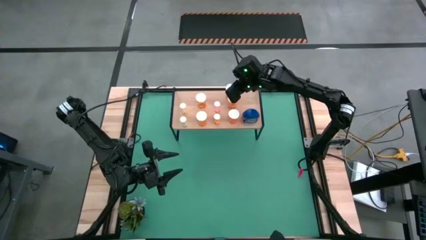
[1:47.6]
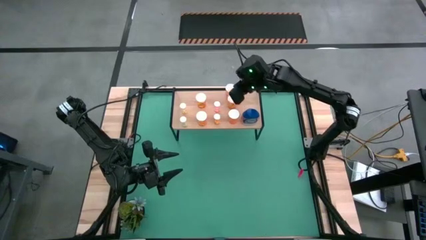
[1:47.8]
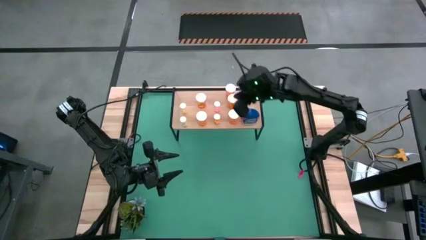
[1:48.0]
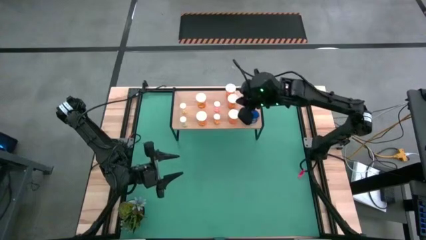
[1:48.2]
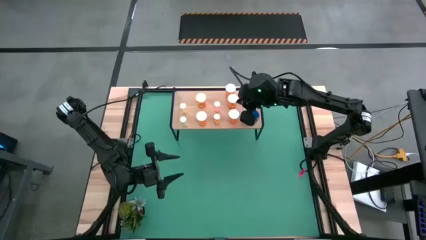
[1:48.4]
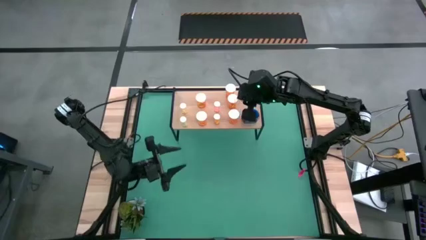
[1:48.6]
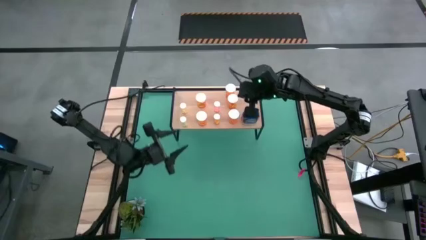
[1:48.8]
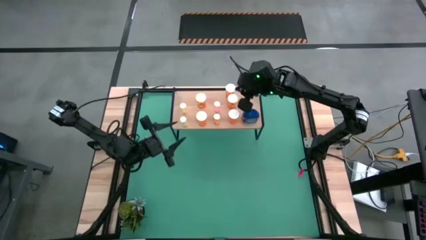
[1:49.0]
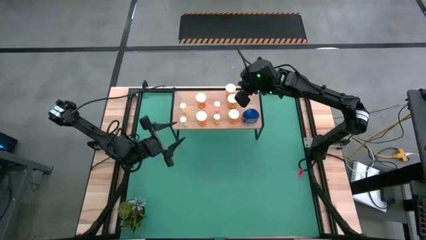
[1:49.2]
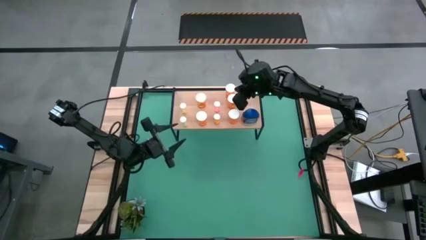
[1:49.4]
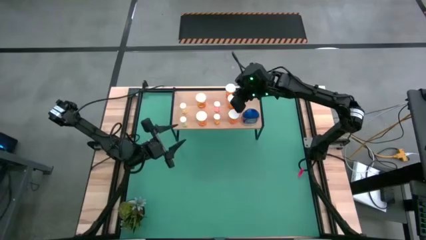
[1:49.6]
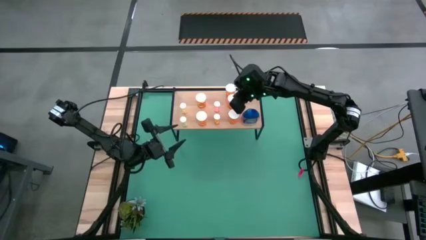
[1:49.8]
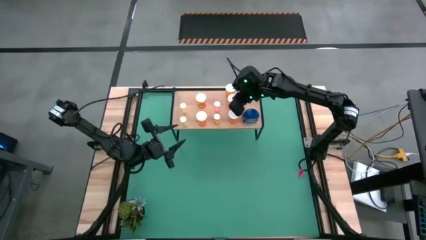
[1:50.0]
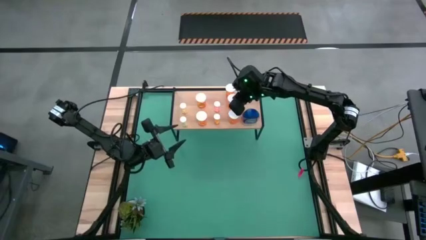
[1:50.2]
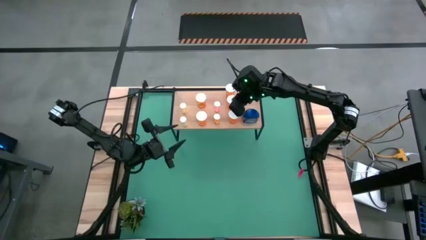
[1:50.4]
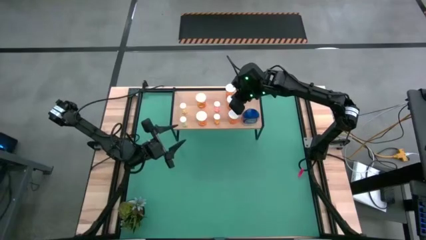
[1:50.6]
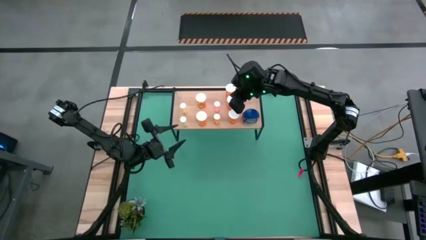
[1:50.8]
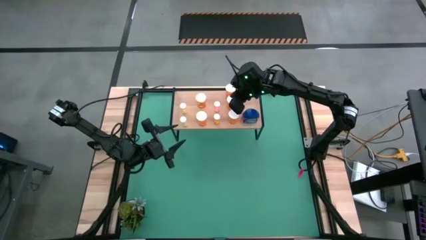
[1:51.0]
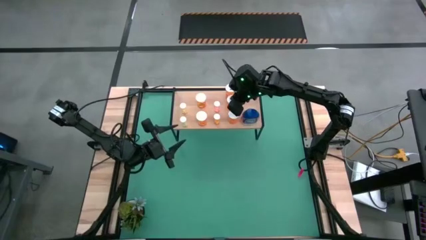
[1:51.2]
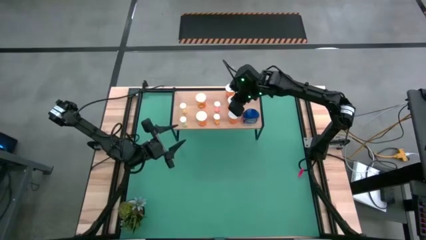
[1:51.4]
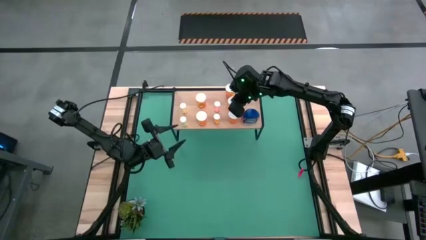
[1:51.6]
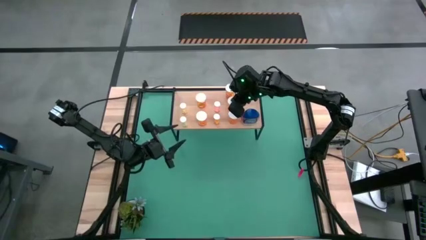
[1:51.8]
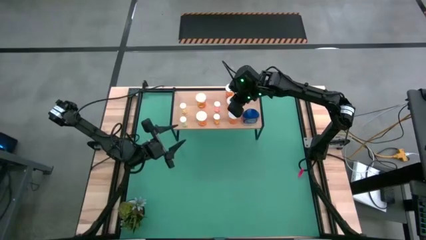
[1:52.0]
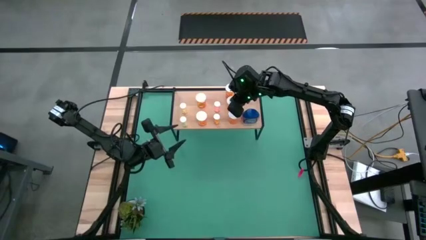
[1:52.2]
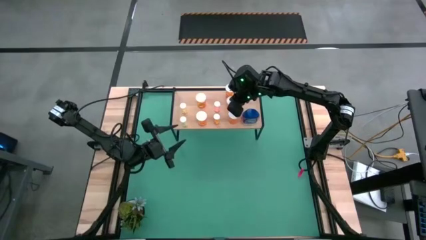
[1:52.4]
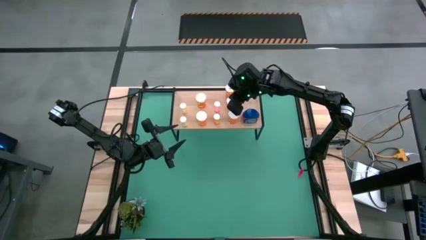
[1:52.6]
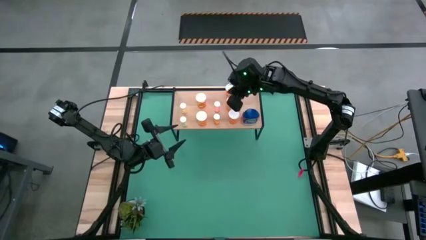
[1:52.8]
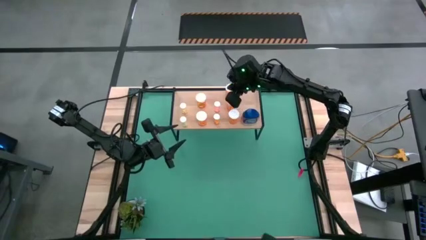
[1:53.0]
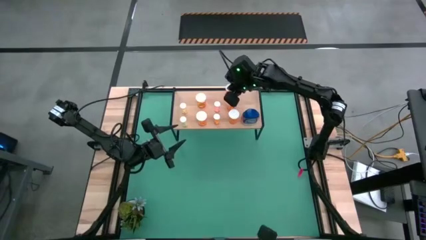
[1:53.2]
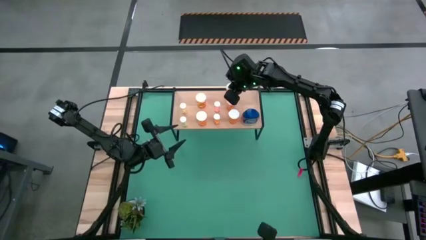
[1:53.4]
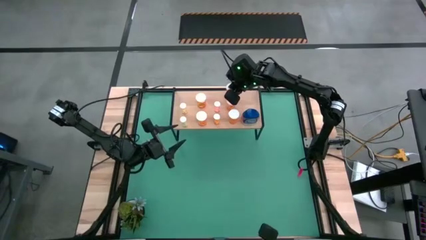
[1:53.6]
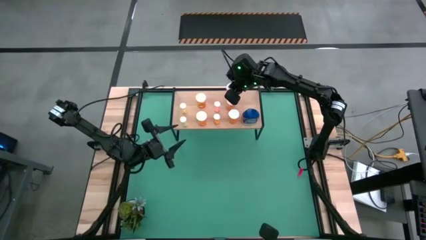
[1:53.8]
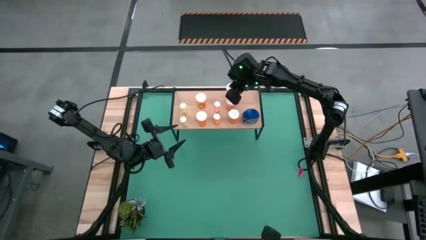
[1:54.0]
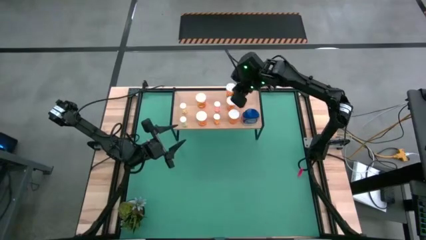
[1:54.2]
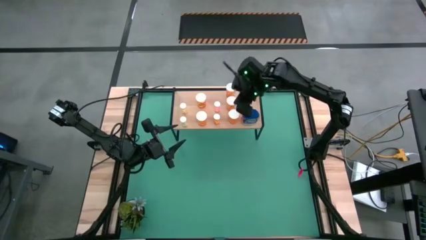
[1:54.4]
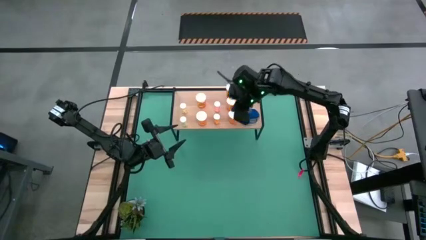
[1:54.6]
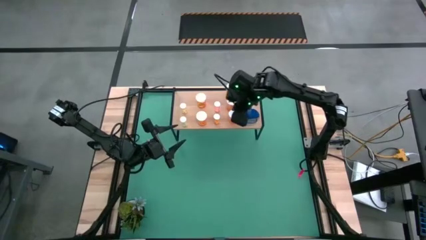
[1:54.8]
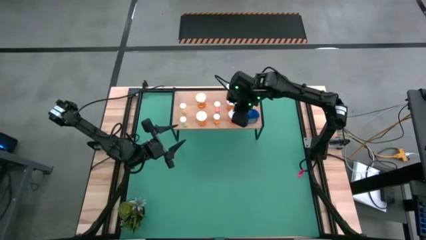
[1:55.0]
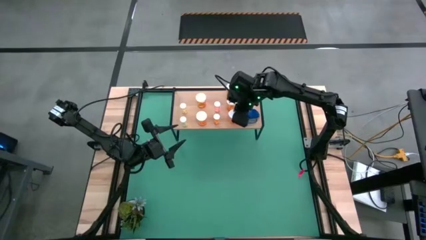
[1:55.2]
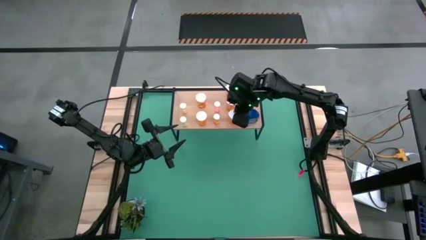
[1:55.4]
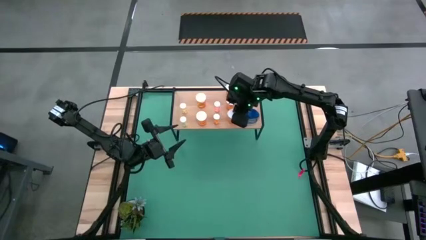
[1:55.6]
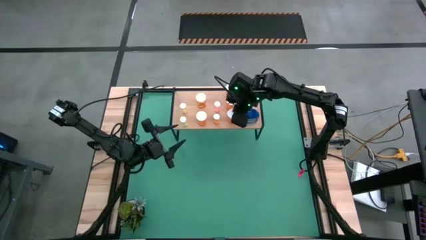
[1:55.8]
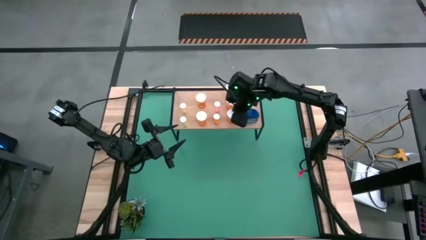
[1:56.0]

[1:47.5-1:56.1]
Task: Pick and place medicine bottles onto shelf by color
Adjust the pill bottles

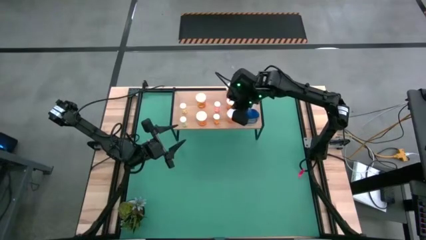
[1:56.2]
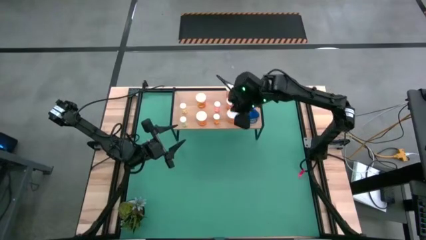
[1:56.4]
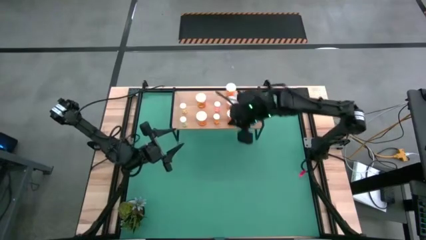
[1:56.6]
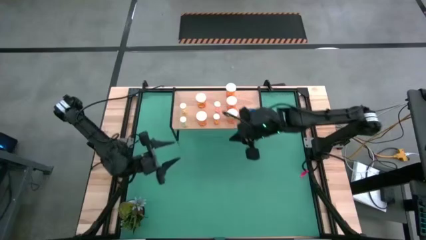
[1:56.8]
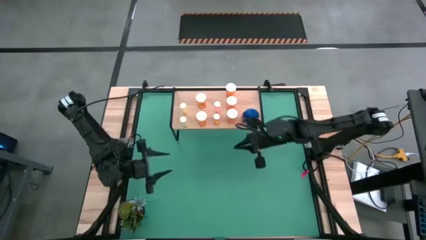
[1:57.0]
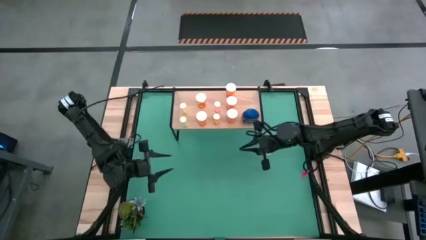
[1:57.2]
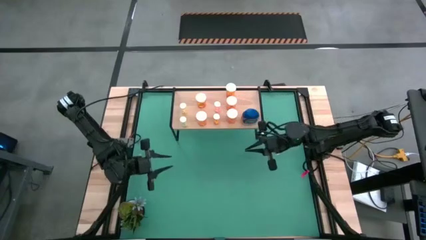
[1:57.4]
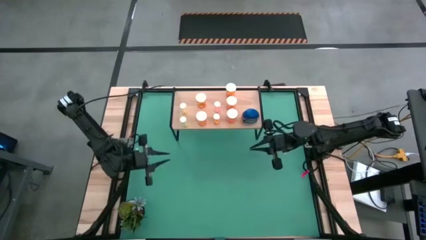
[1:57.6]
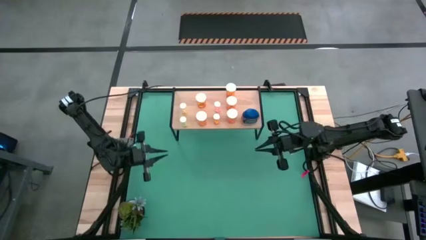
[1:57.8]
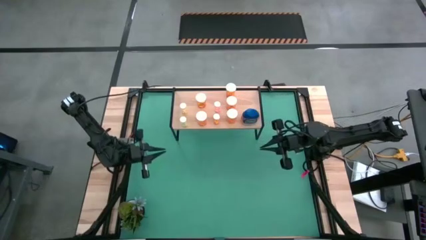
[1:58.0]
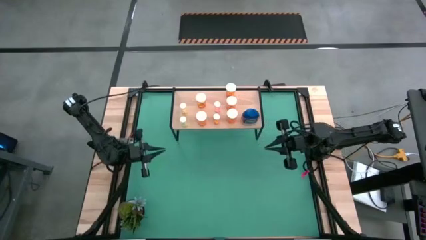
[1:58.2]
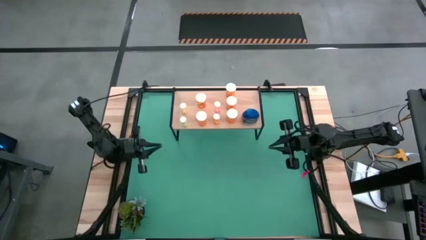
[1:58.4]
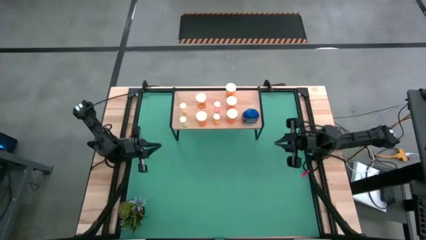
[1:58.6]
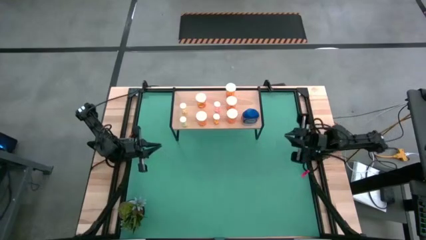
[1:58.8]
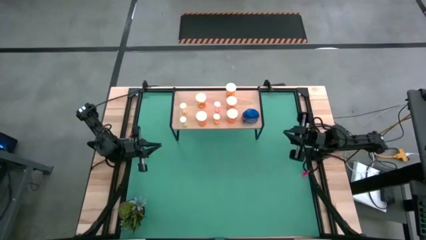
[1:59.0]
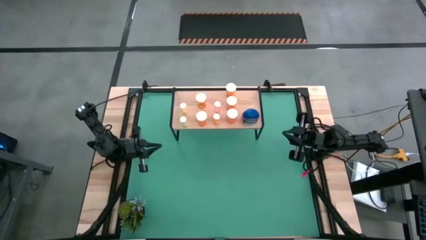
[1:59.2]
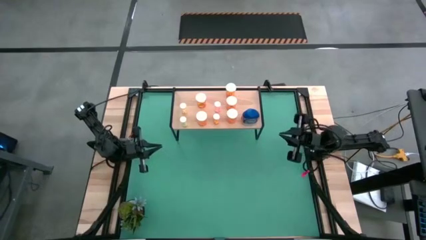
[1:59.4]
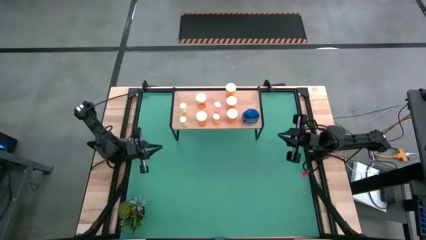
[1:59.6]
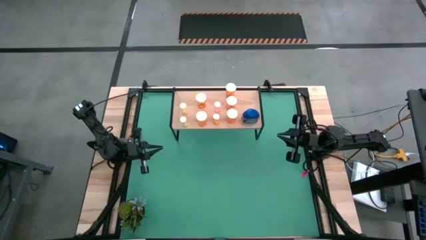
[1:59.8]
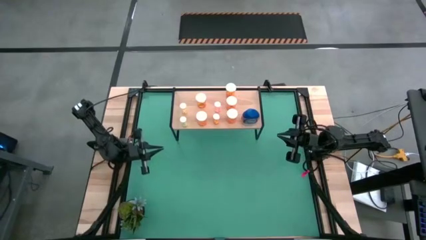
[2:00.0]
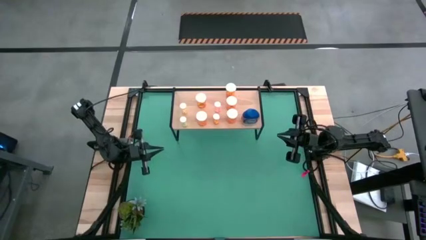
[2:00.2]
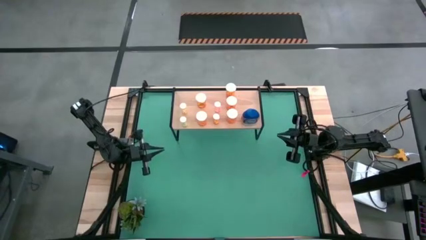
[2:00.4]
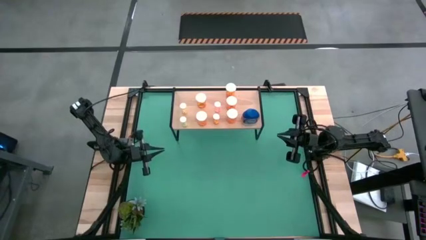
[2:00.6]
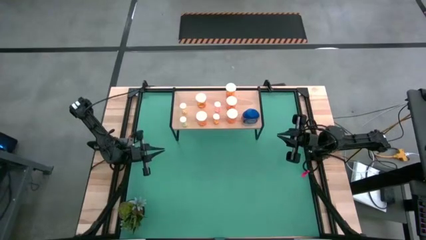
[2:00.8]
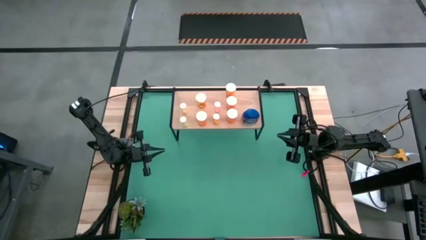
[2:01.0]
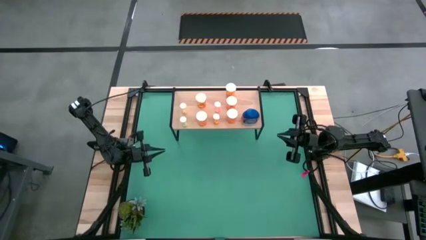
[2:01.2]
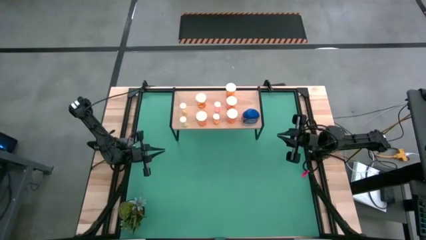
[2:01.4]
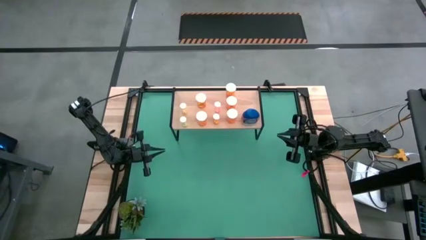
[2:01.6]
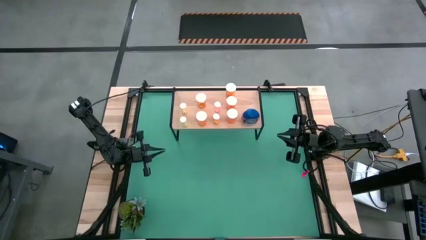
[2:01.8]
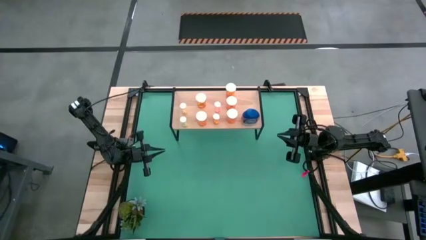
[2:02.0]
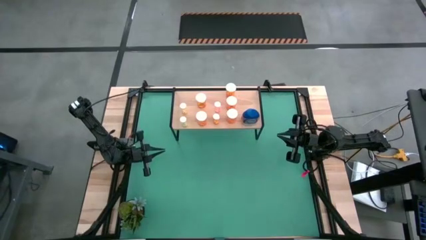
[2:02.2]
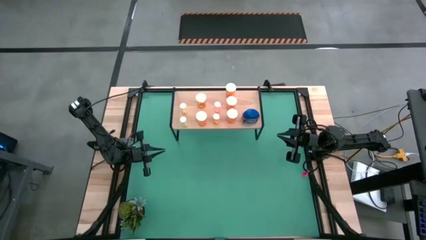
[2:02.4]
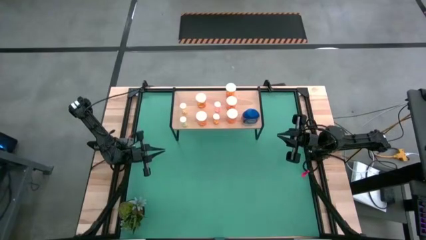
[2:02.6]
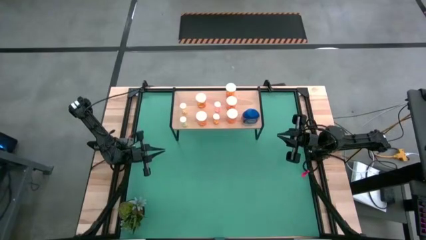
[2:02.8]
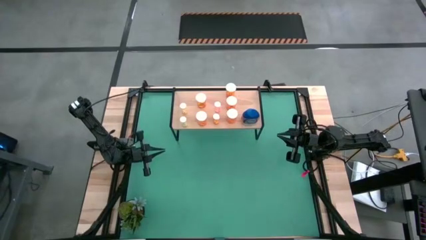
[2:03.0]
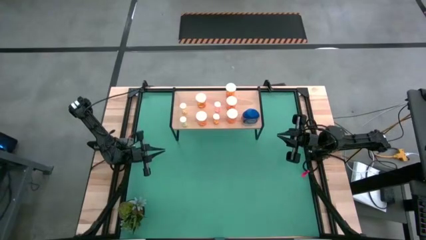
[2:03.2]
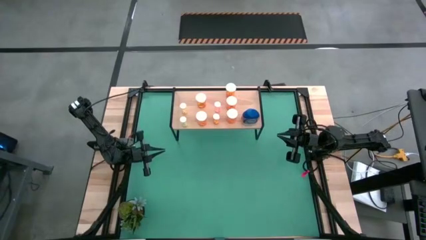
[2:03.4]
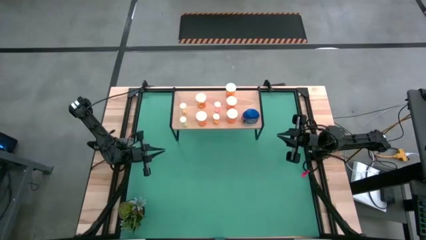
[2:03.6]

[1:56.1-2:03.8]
Return to Home Position
